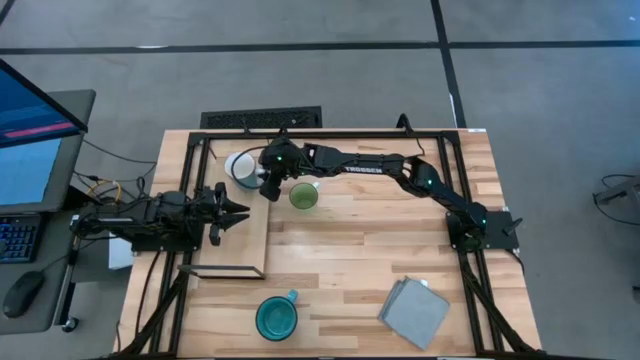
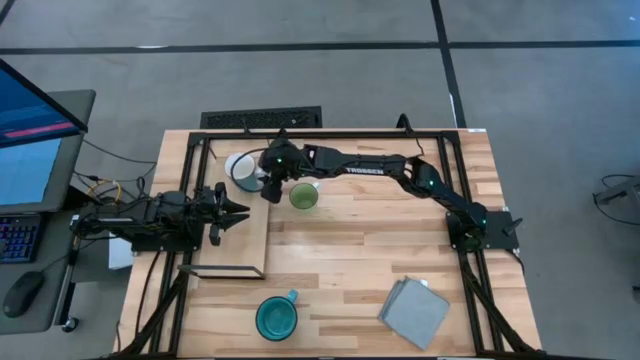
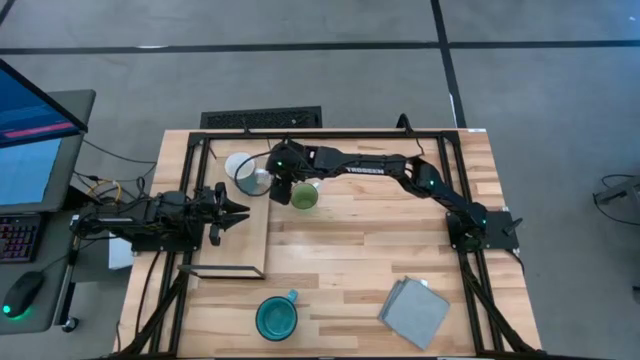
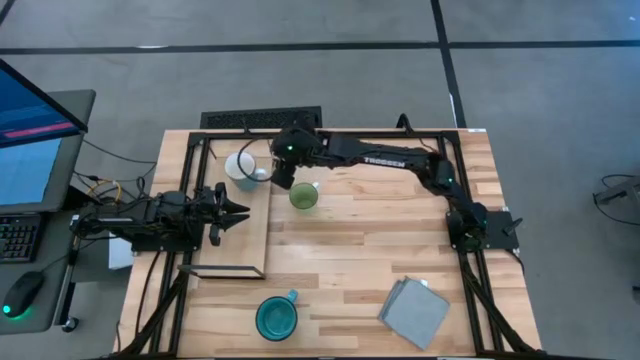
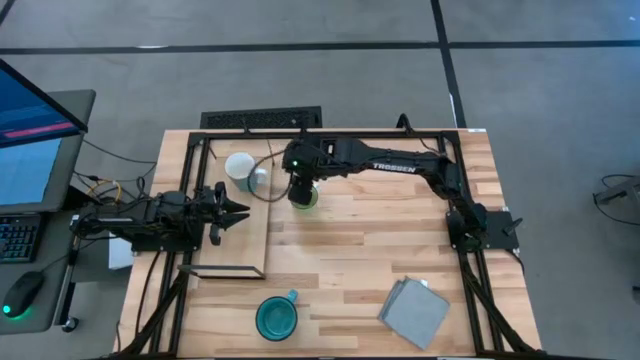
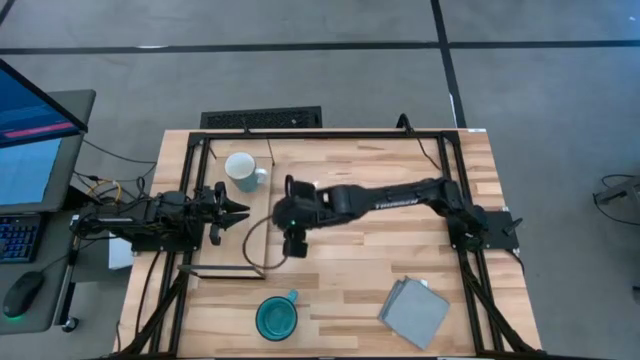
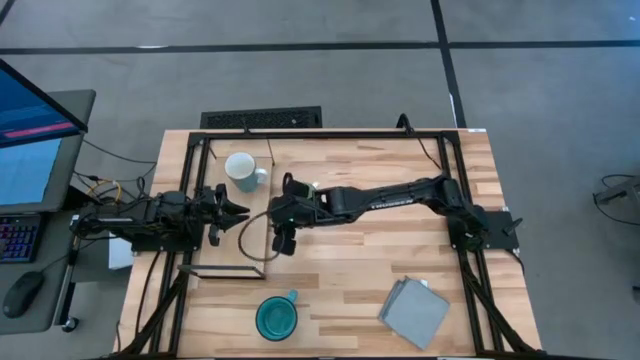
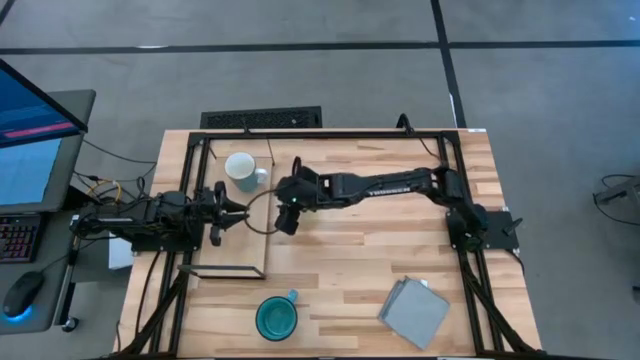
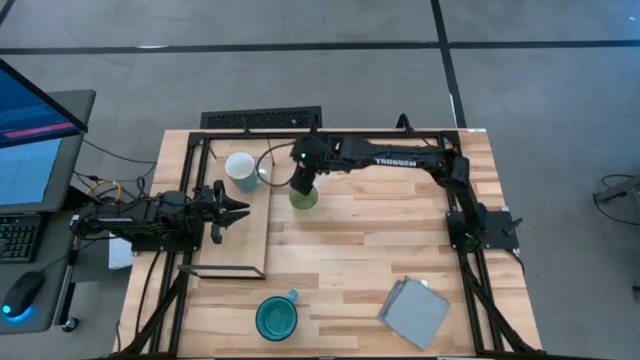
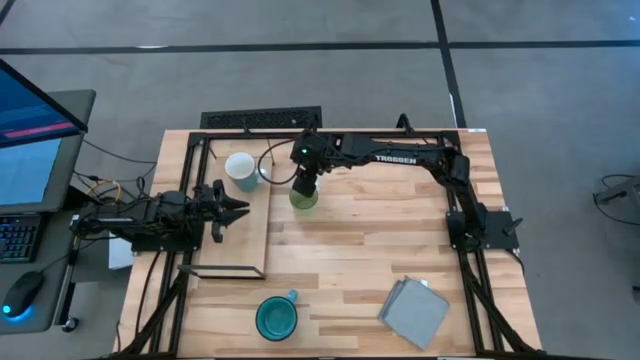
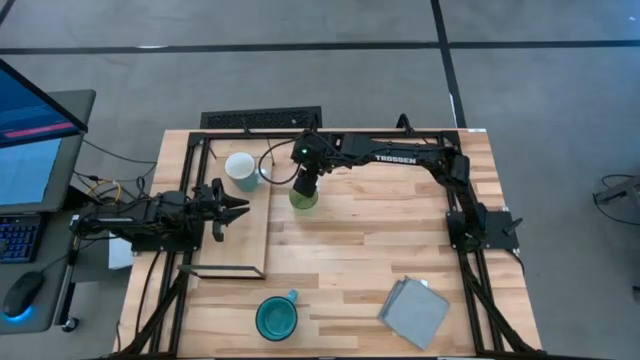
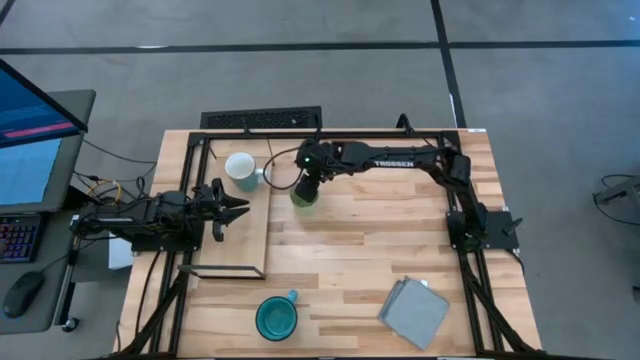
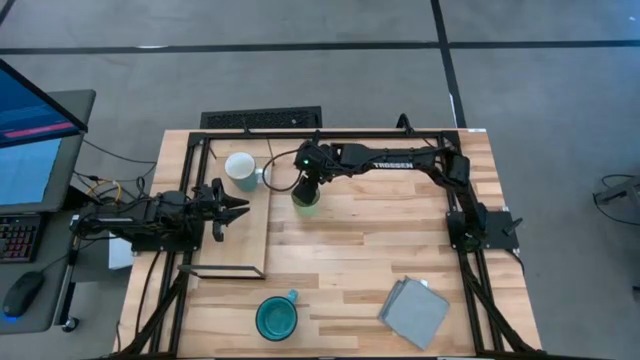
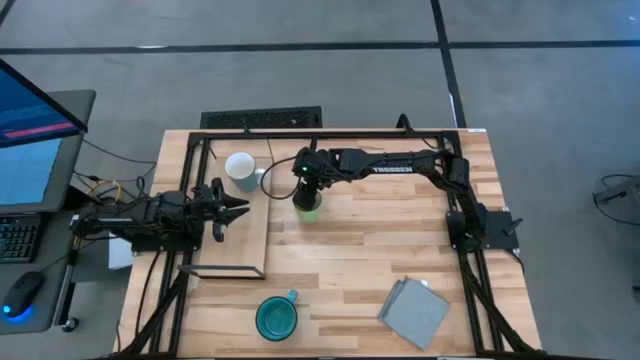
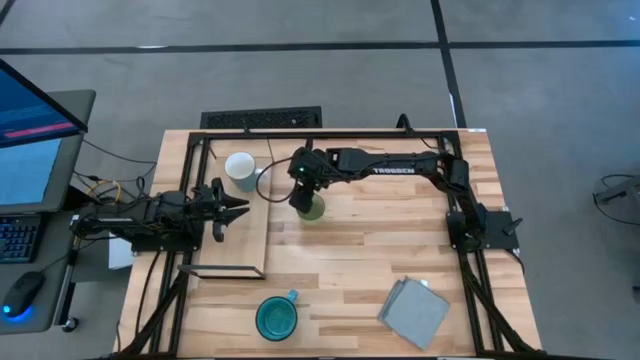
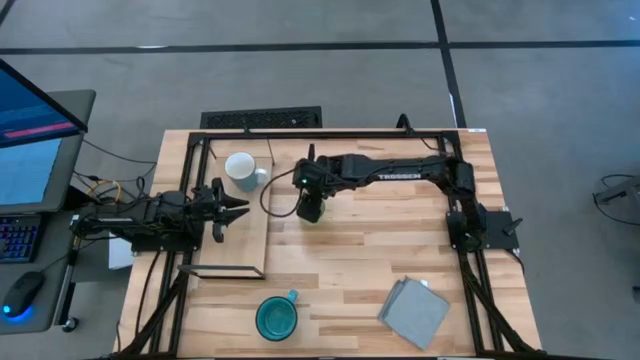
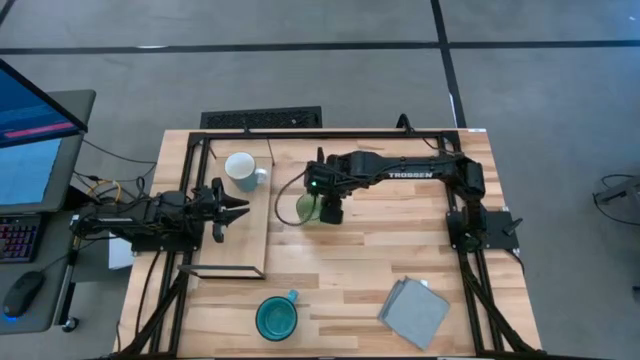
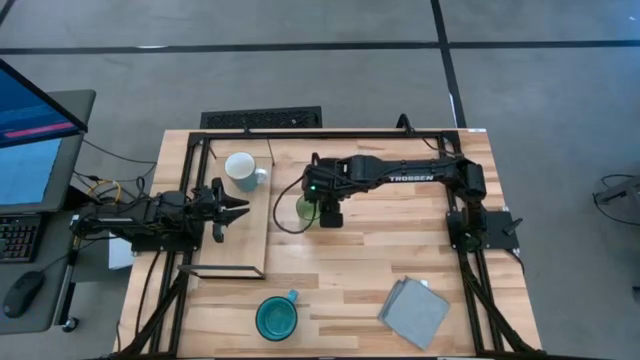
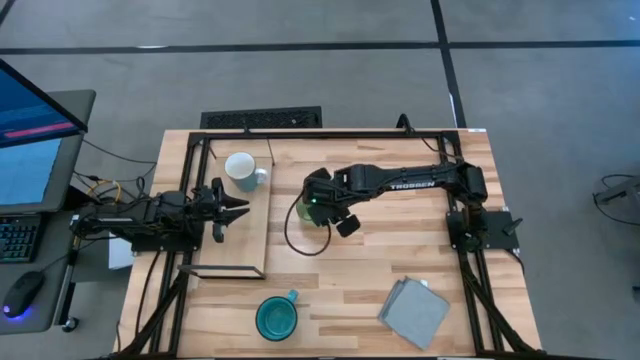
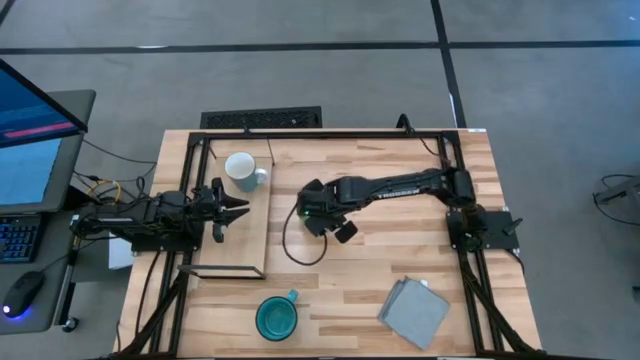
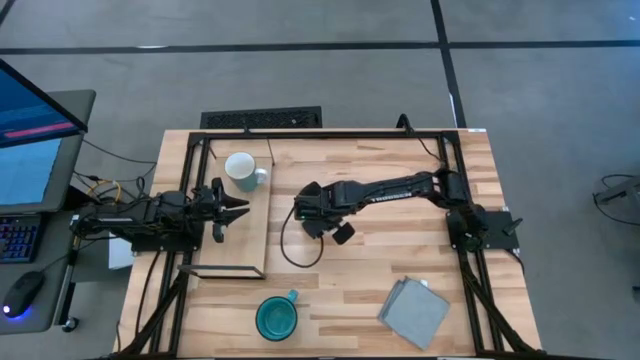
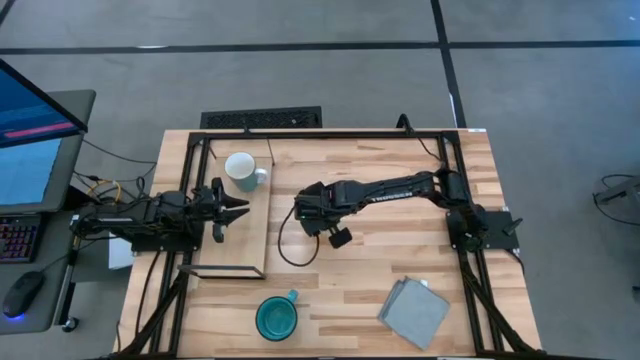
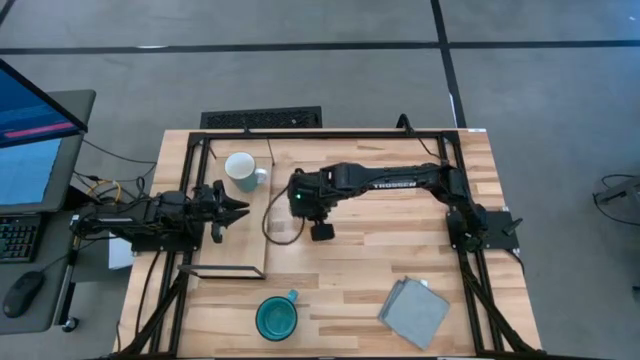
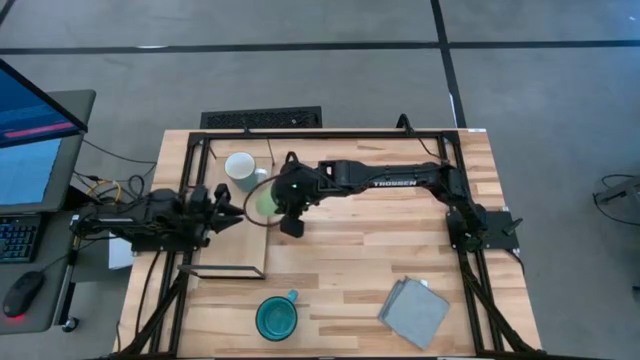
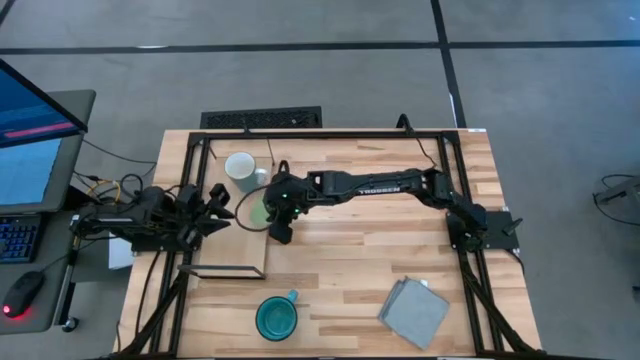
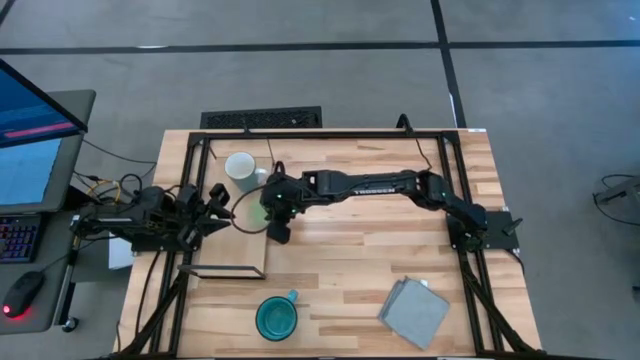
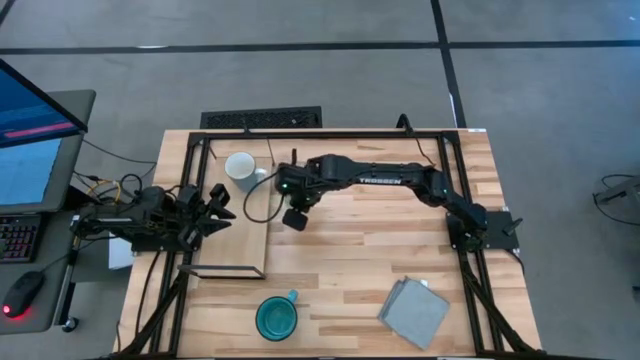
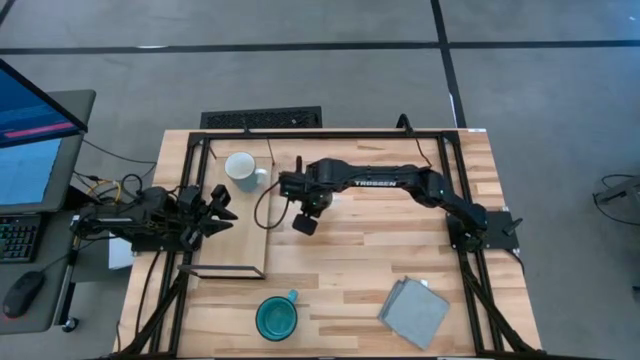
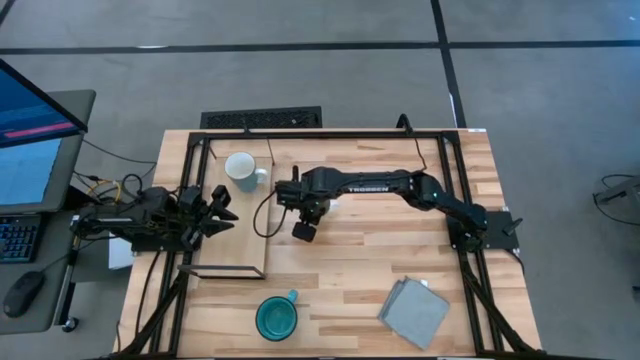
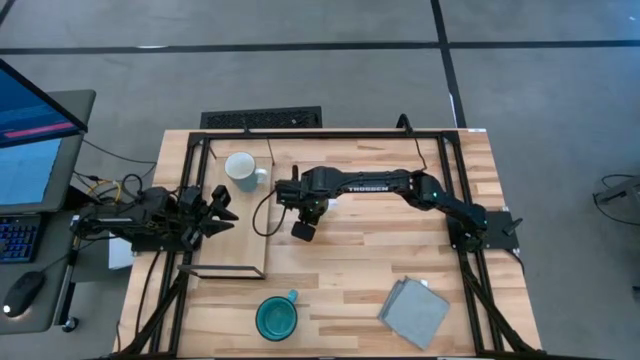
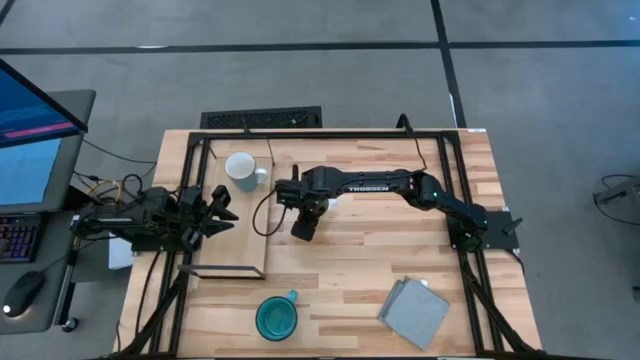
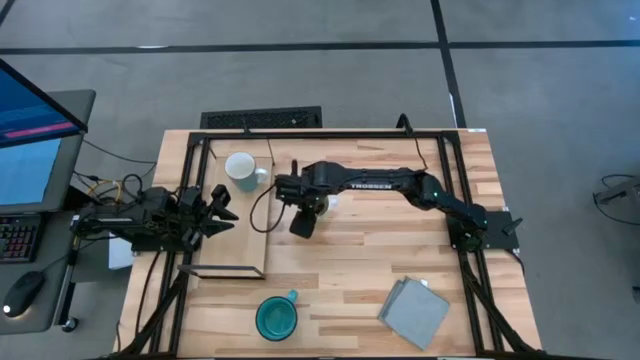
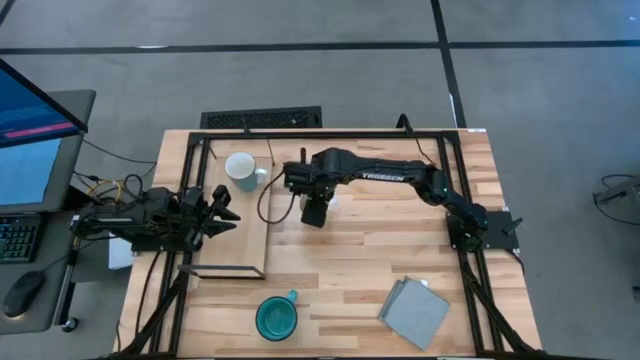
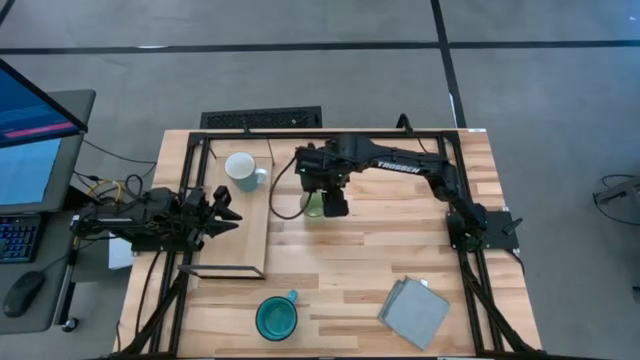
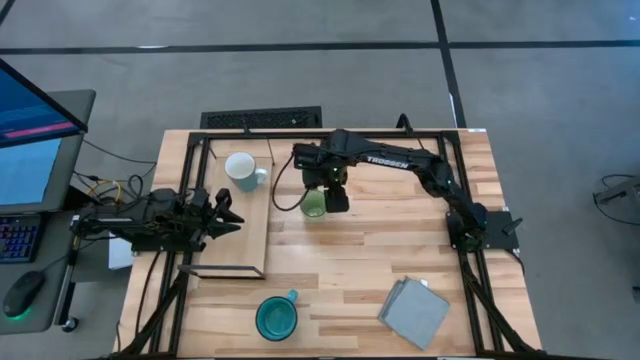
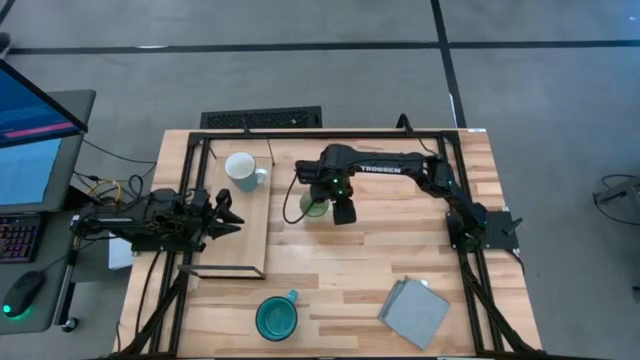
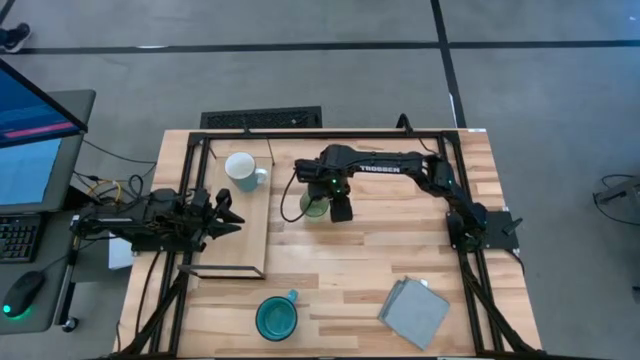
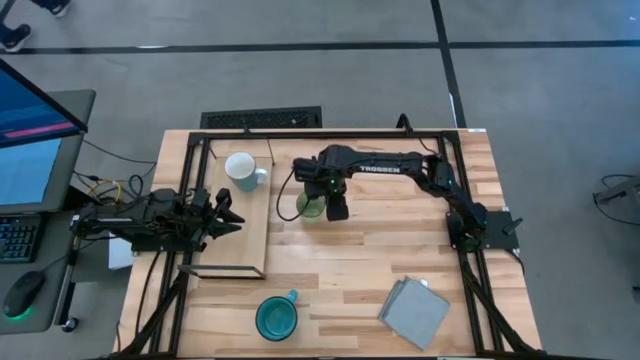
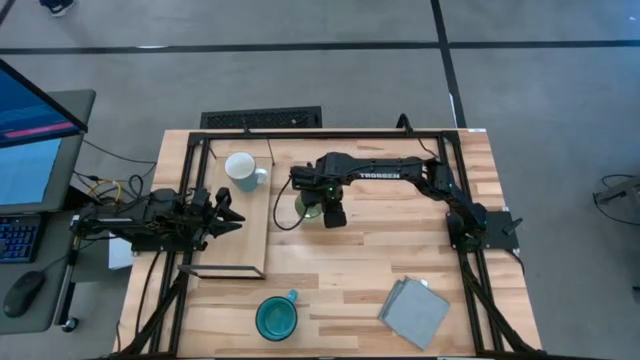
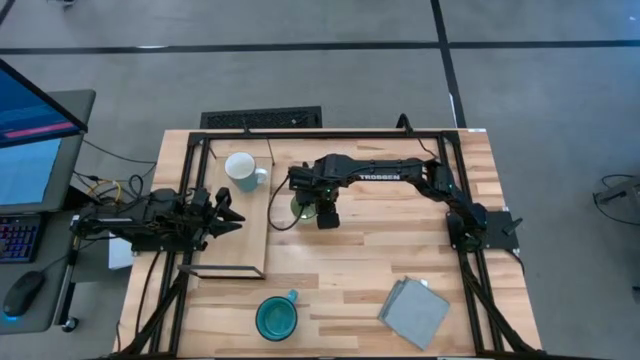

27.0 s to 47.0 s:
Task: Stack small to large cups/mugs on shelf
Put the green mug on the shelf
